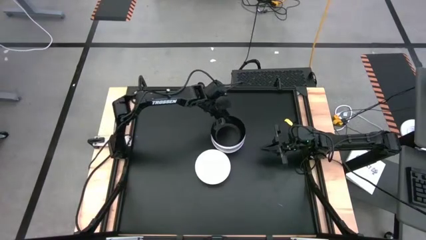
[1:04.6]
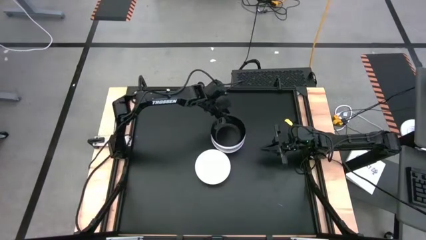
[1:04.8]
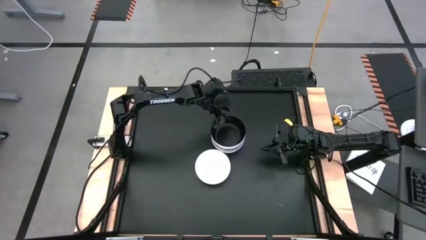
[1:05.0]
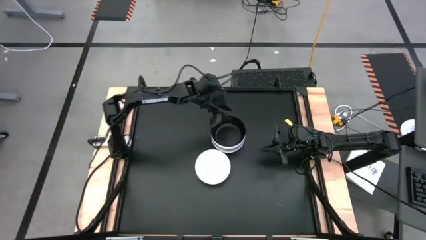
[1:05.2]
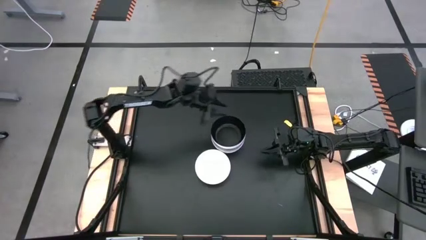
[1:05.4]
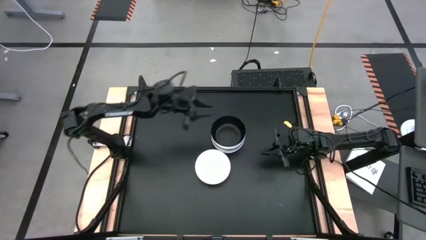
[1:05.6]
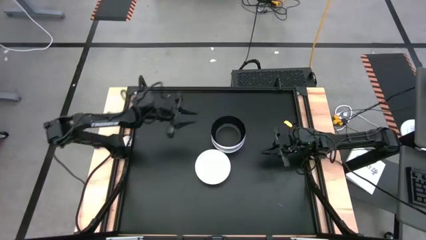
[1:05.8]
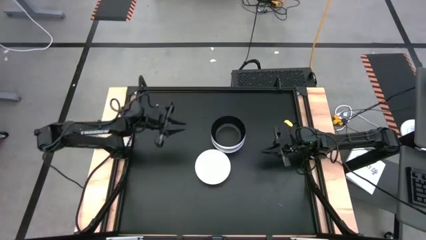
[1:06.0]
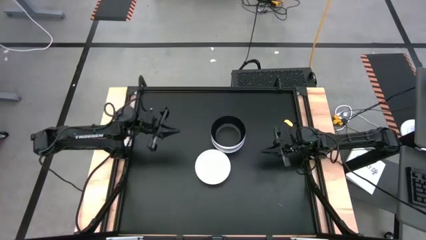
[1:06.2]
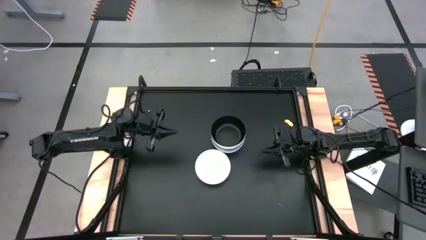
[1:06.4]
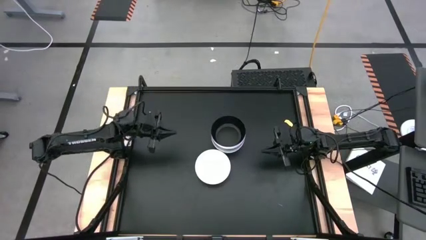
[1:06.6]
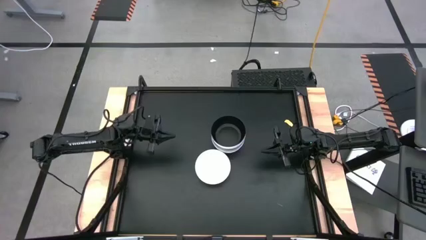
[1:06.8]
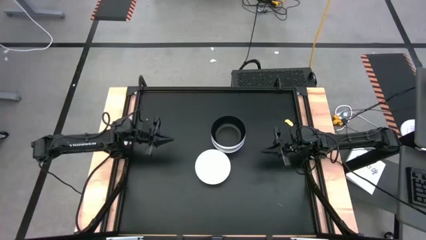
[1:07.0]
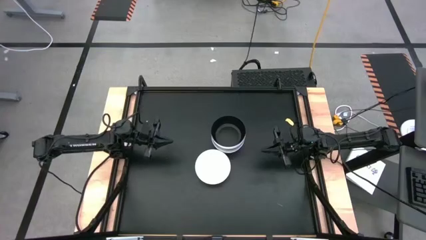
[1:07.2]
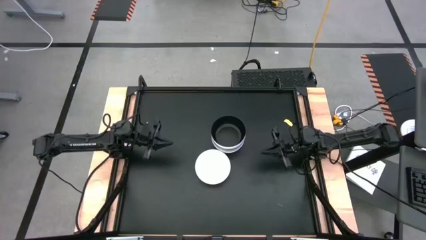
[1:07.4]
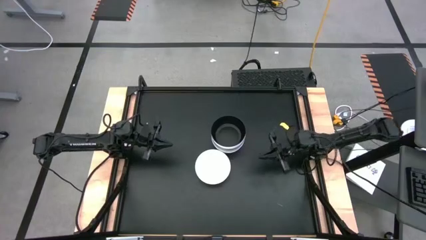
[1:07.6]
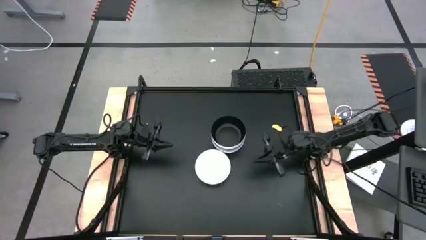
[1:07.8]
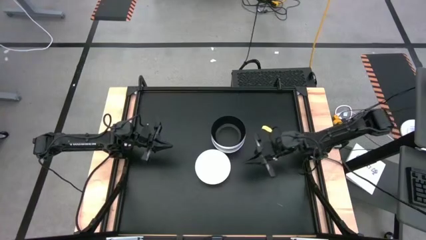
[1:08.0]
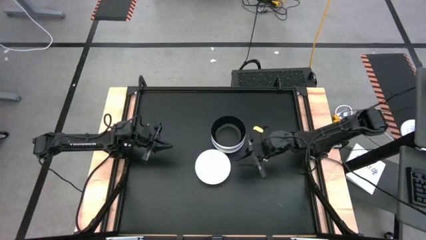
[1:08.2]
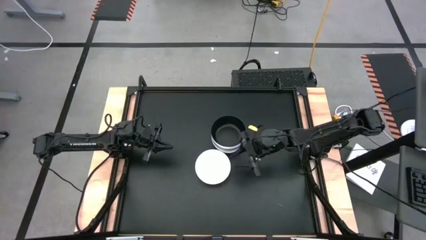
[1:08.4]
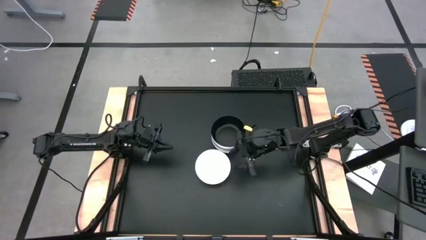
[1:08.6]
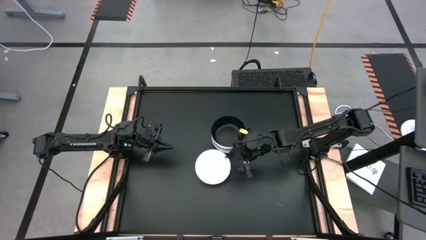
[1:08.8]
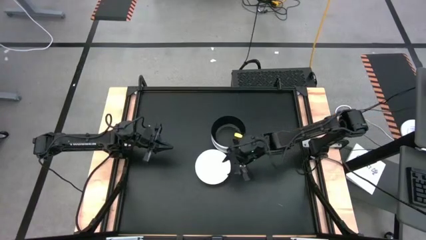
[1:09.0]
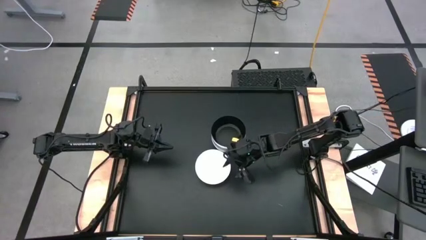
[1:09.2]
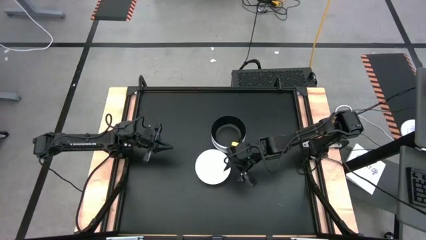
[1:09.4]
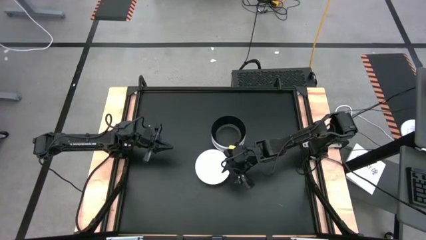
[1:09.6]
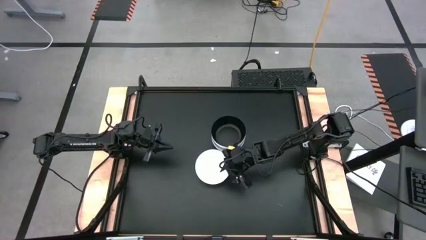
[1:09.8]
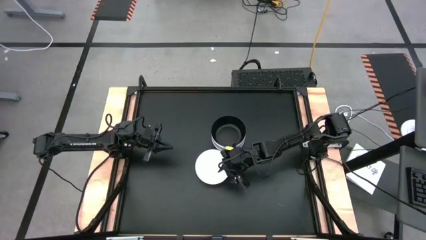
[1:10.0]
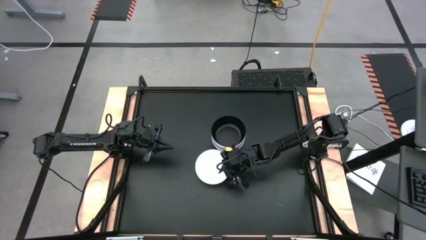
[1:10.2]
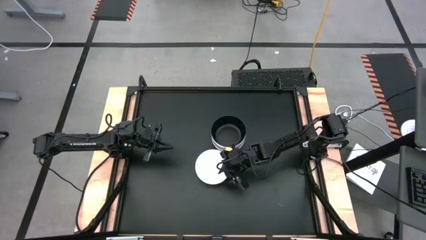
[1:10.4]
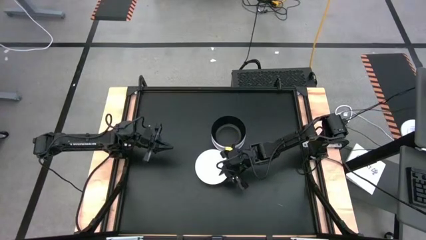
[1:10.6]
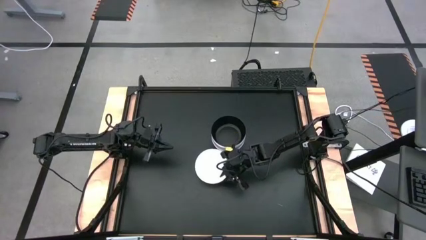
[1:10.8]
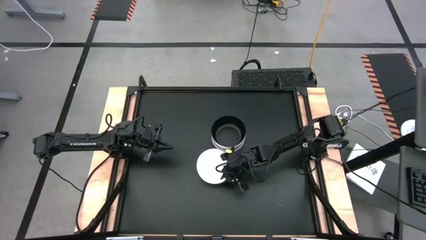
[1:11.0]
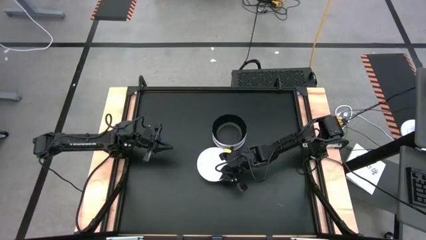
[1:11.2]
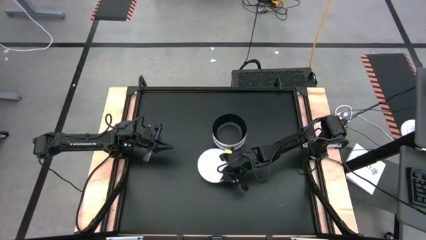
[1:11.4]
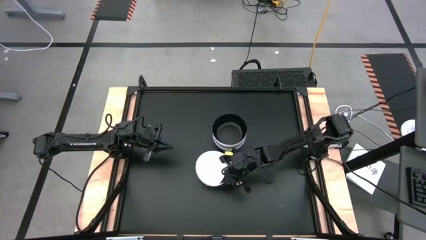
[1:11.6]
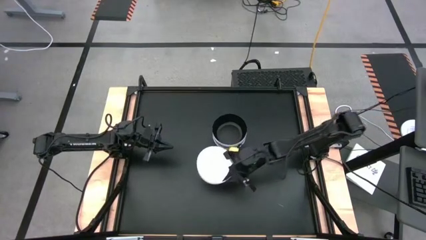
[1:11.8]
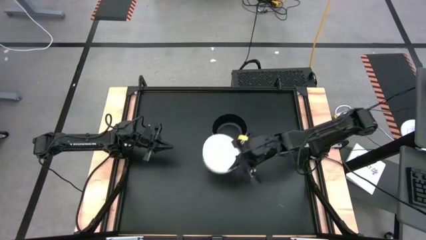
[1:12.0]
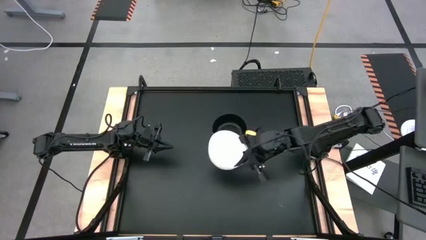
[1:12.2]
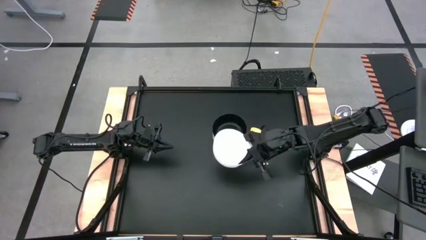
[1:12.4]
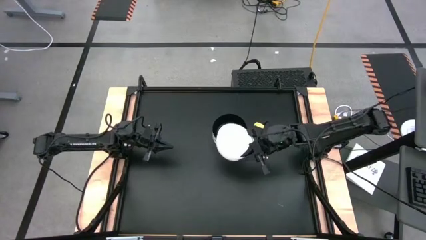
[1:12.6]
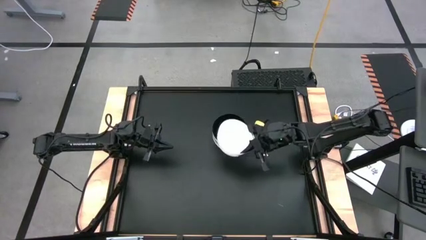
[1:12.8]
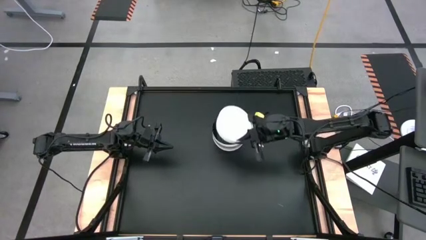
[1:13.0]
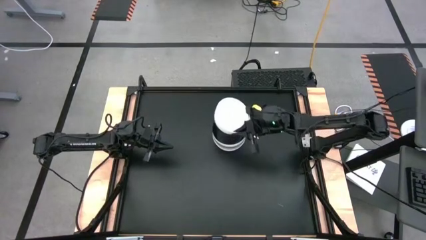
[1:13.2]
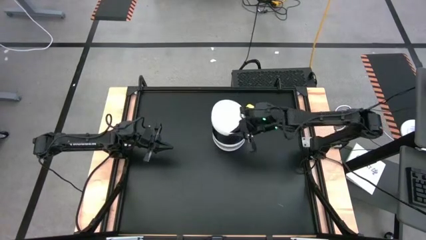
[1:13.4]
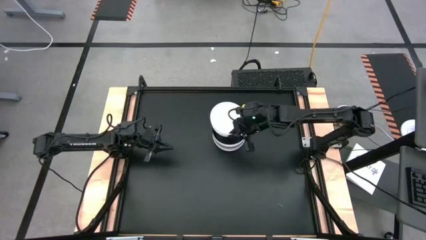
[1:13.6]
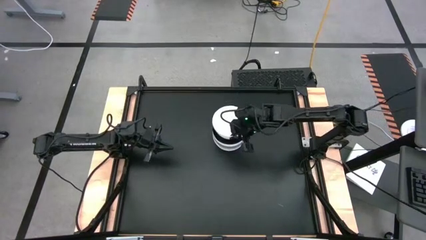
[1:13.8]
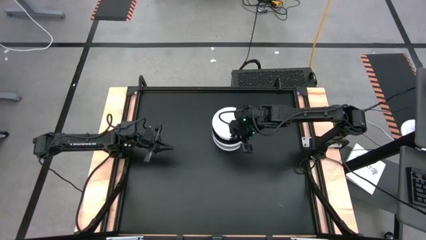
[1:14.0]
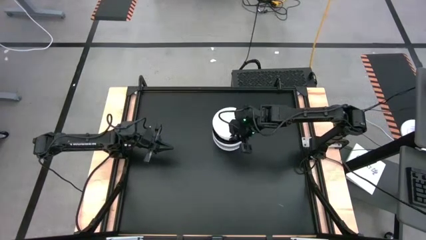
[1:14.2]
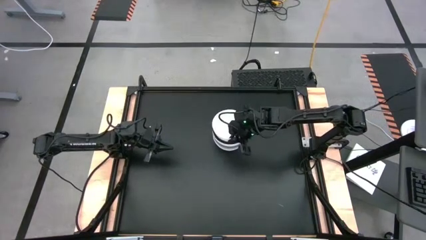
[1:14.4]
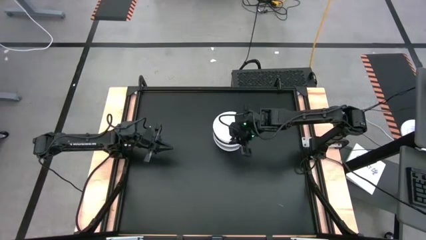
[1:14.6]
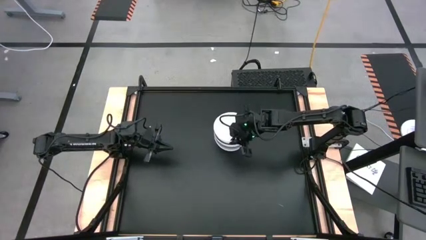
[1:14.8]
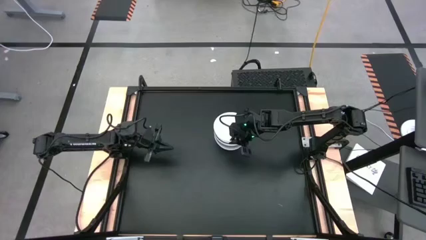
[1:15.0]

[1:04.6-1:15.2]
Task: Nest bowls inside each other
Stack the white bowl on top of the black bowl

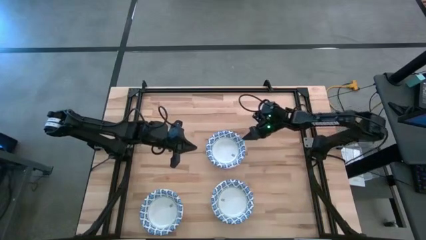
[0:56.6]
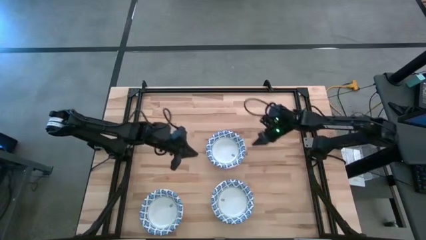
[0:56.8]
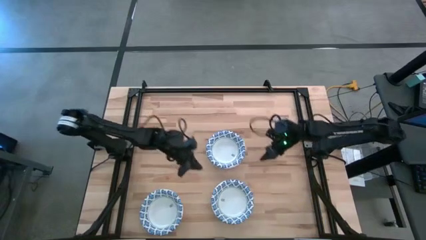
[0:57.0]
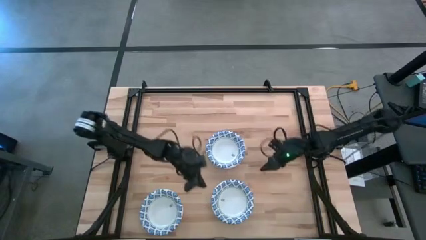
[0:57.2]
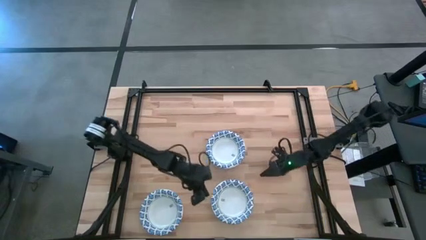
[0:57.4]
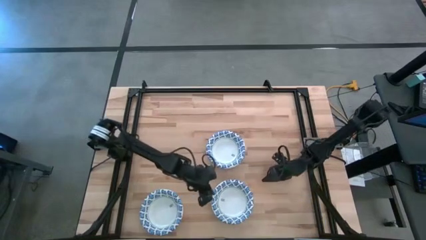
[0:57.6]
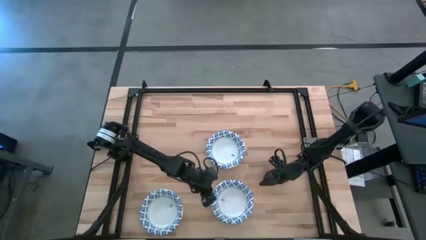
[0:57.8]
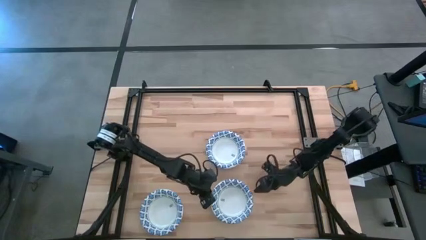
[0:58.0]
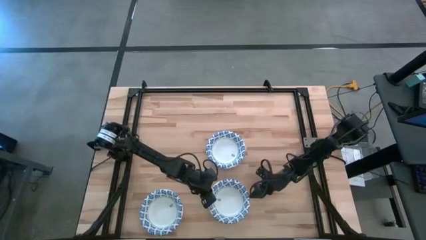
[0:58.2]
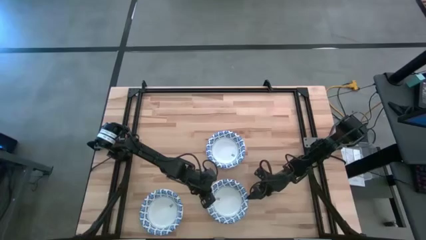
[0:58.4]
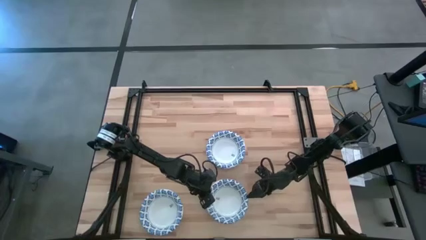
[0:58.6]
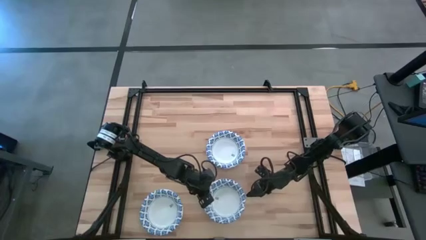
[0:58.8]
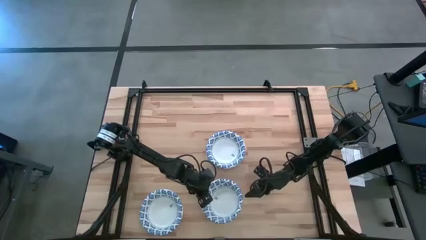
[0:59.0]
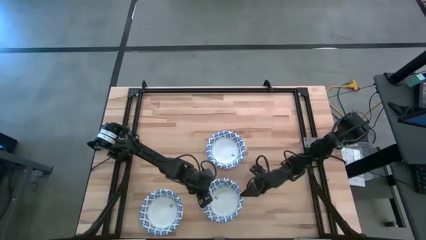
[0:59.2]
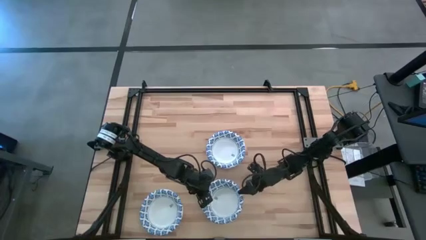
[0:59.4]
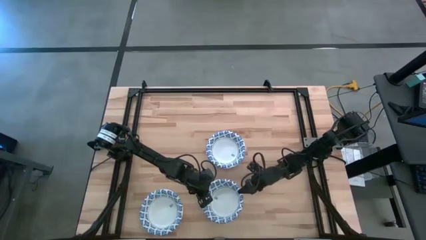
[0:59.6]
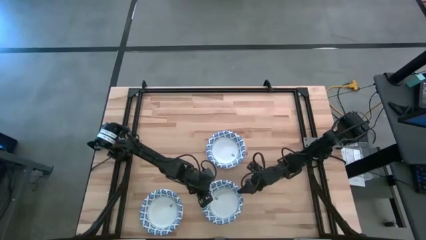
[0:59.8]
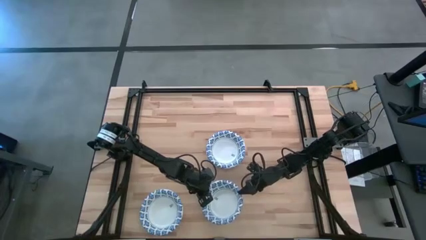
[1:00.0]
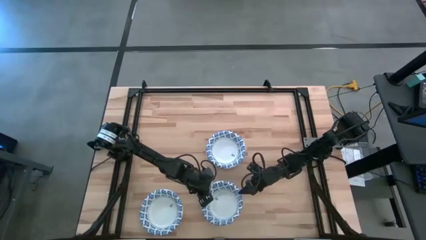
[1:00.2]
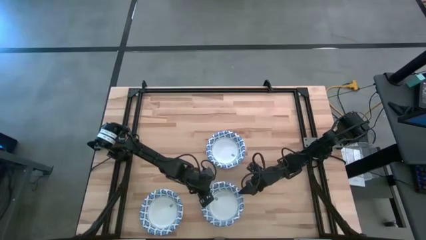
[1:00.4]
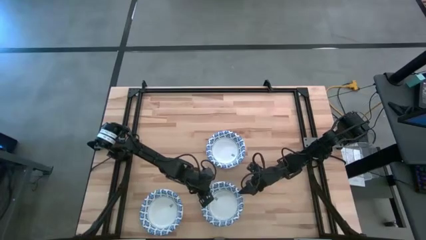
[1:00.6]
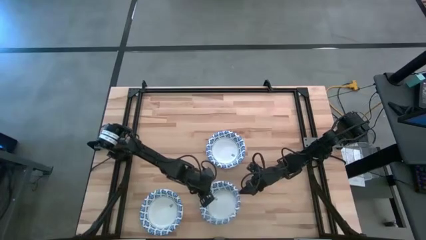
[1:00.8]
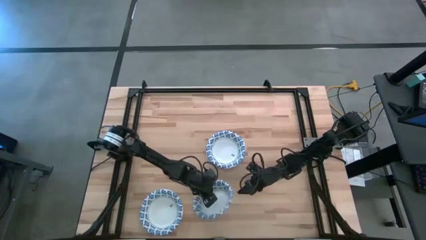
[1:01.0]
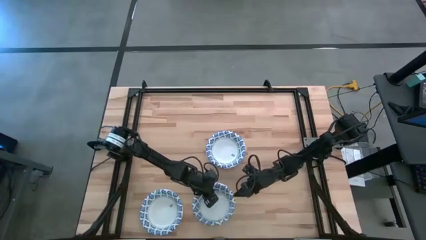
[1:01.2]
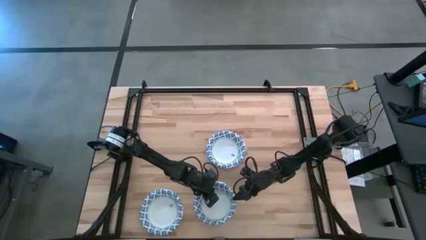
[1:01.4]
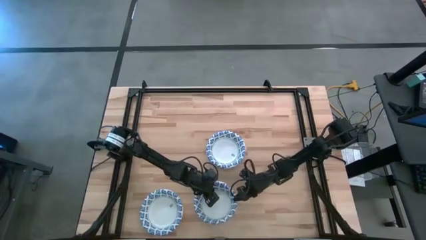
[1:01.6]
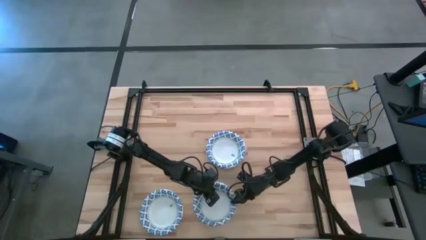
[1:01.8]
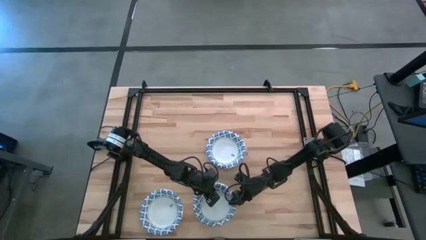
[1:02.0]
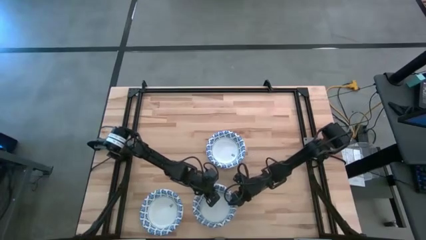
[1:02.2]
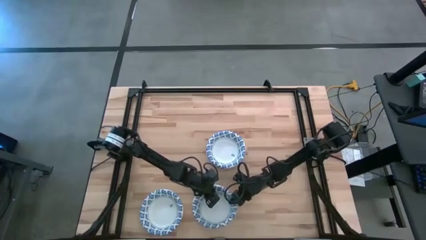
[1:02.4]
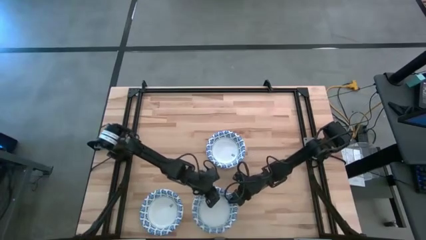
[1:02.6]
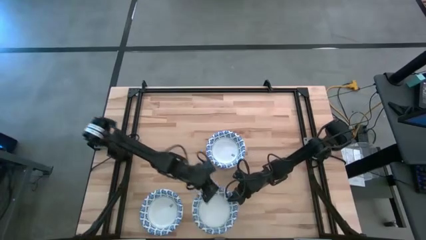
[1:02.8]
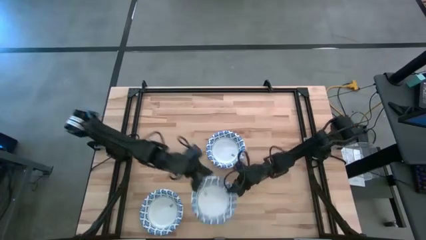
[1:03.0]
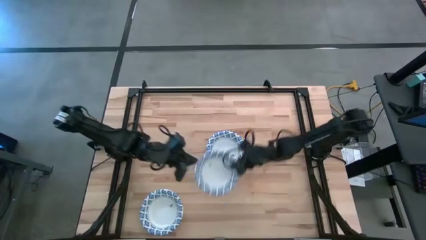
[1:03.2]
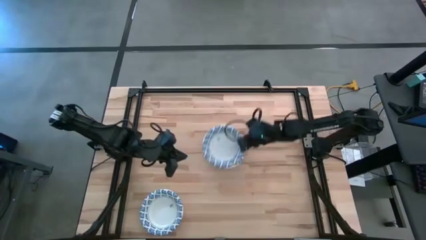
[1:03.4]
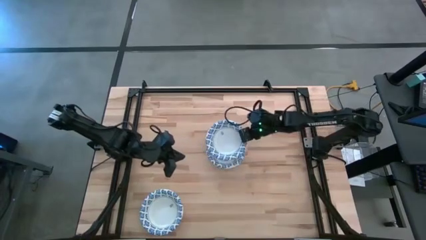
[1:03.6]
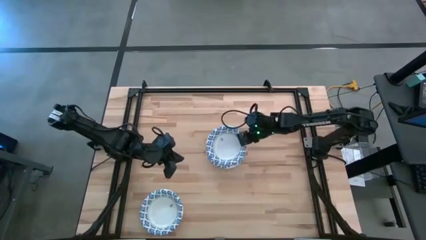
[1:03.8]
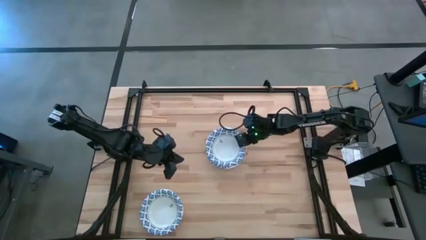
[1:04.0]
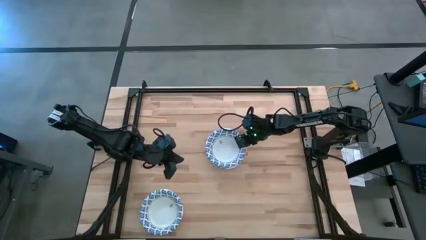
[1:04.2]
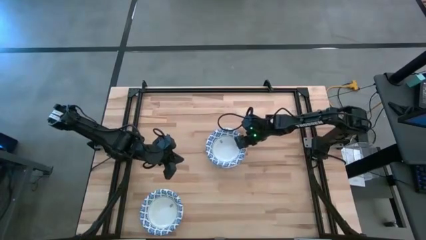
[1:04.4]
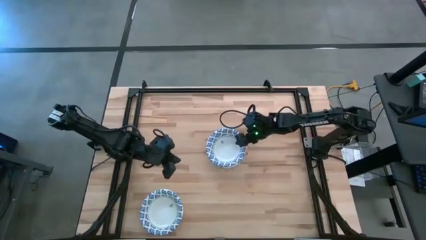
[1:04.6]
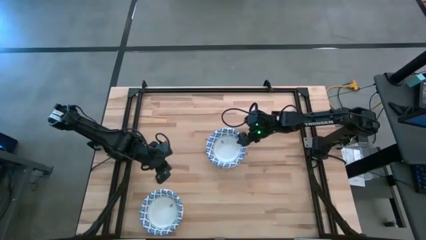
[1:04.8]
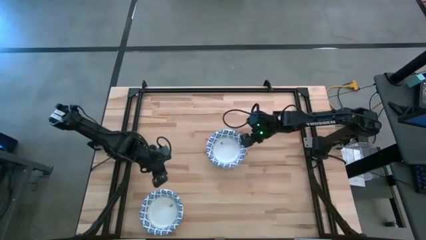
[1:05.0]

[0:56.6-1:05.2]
Task: Nest bowls inside each other
Stack the white patterned bowl on top of the center white patterned bowl
